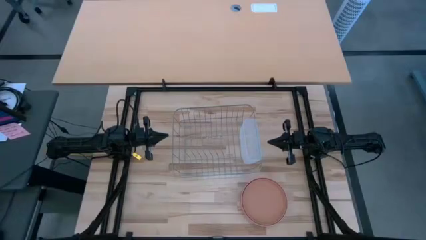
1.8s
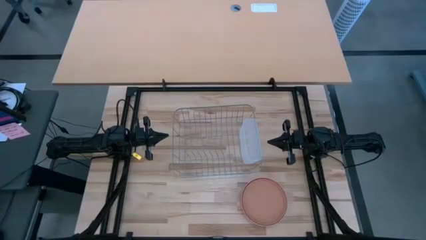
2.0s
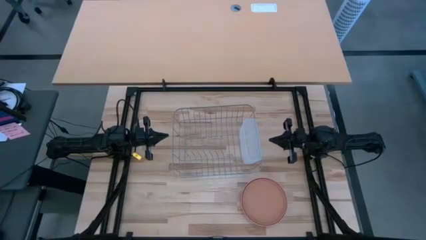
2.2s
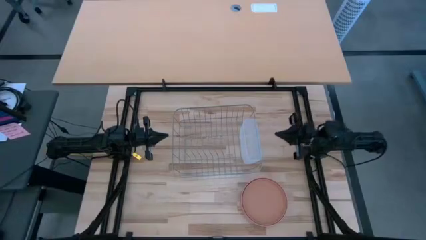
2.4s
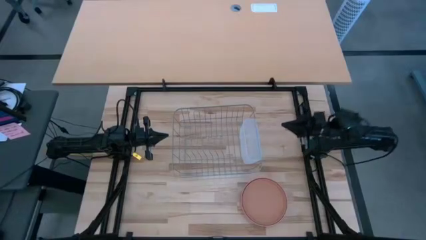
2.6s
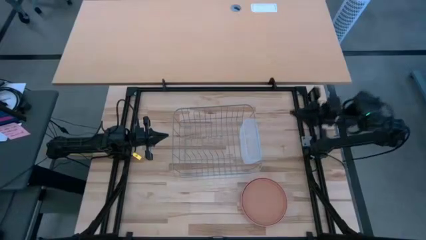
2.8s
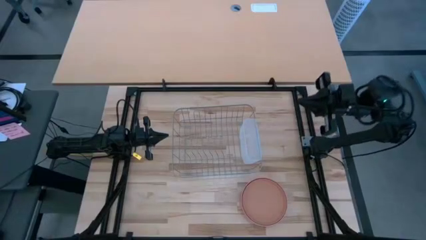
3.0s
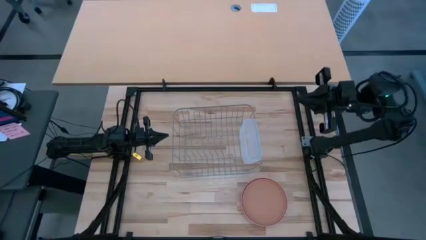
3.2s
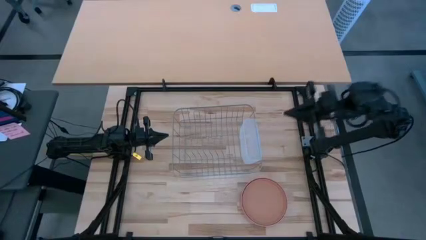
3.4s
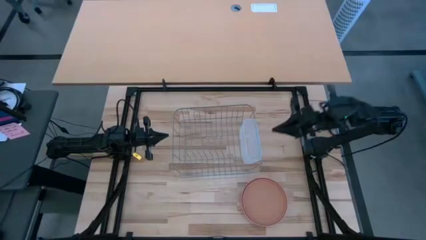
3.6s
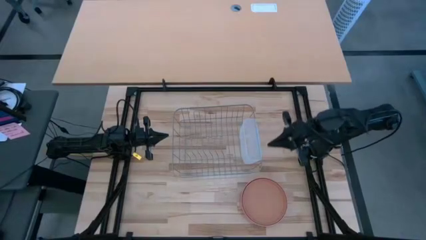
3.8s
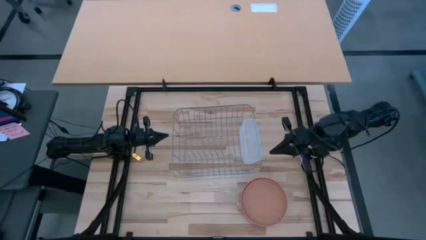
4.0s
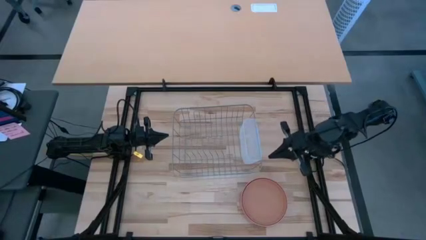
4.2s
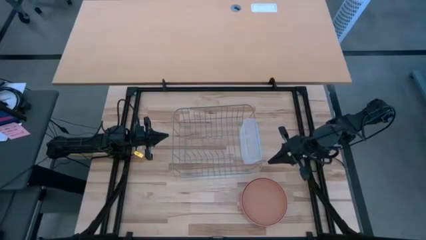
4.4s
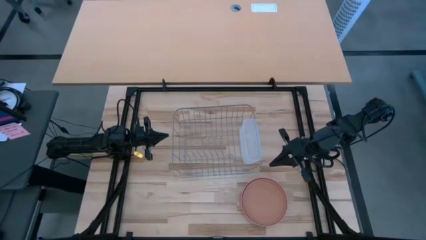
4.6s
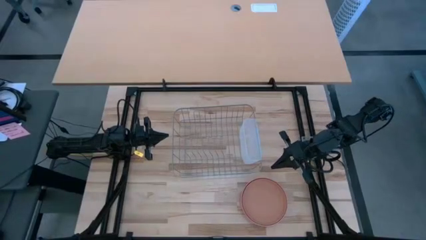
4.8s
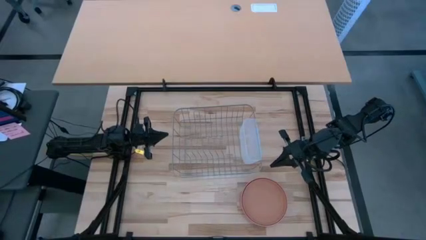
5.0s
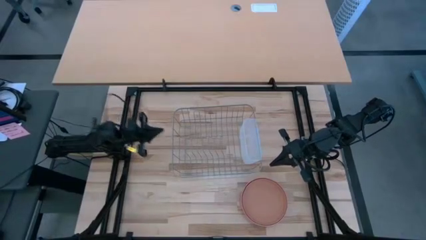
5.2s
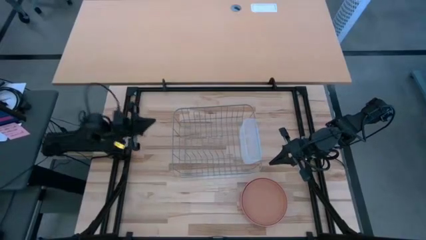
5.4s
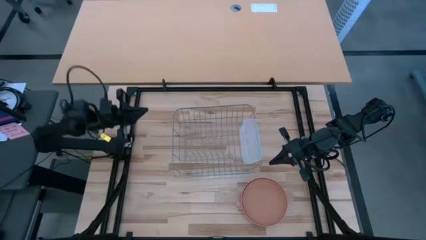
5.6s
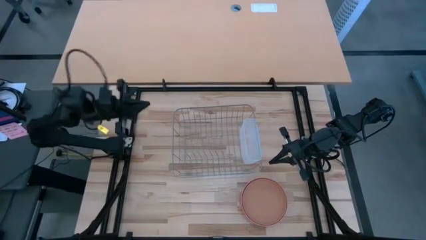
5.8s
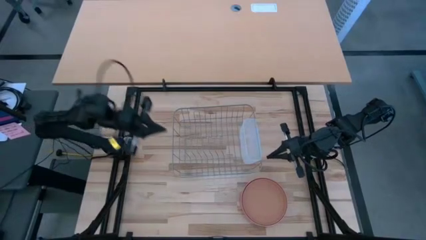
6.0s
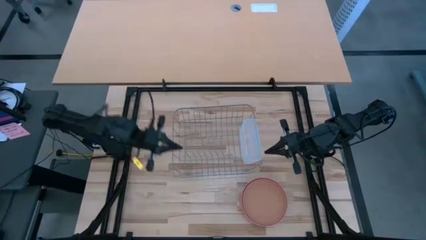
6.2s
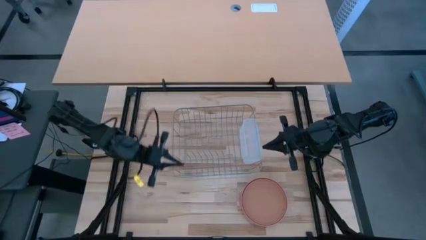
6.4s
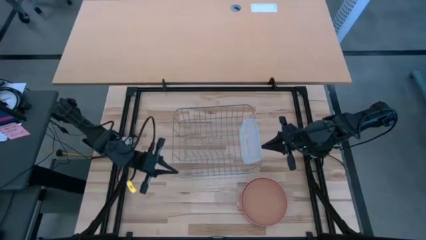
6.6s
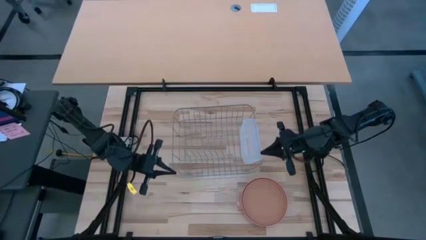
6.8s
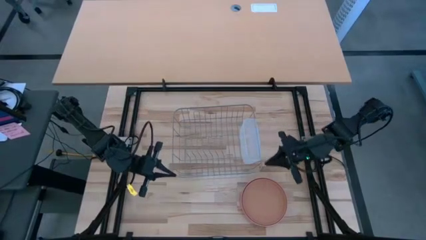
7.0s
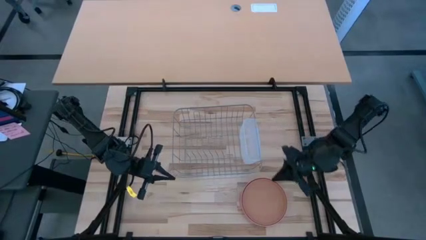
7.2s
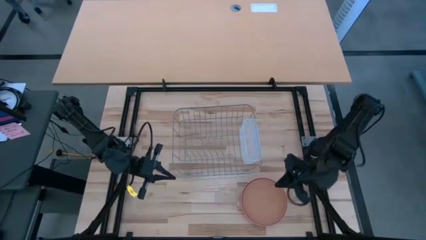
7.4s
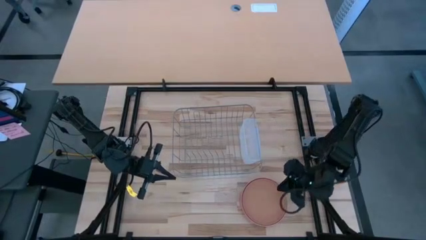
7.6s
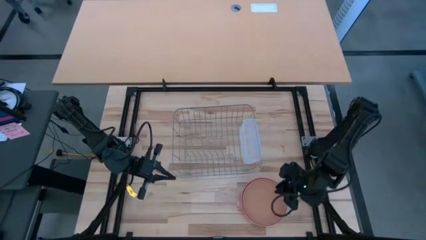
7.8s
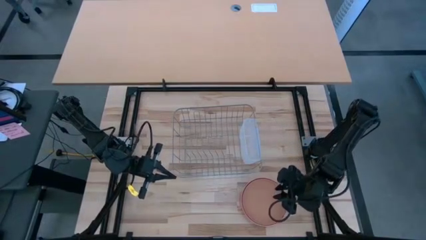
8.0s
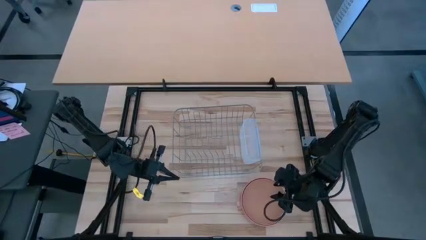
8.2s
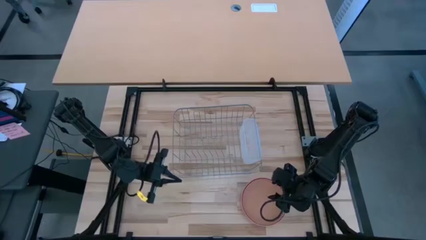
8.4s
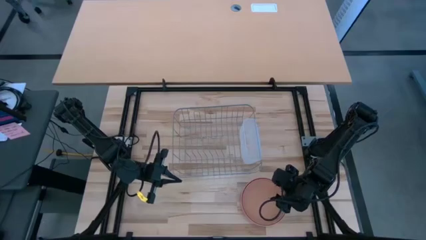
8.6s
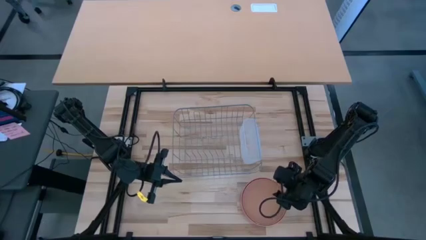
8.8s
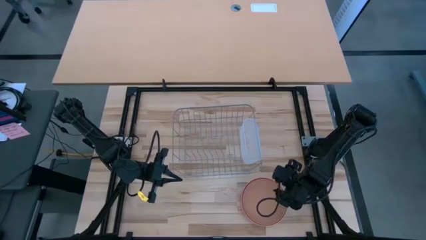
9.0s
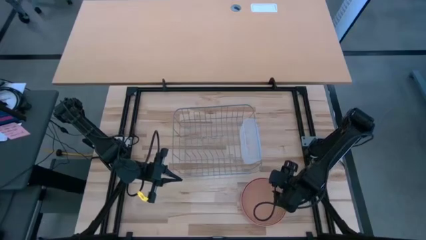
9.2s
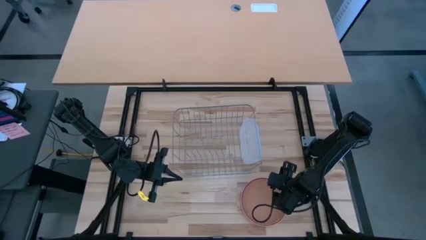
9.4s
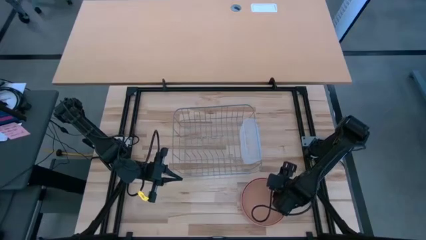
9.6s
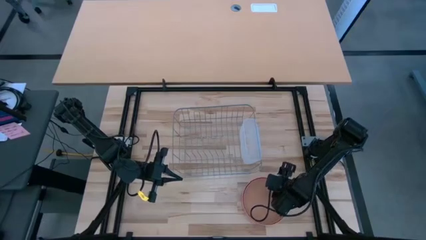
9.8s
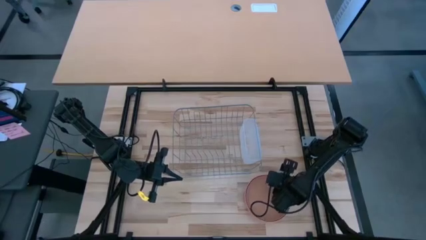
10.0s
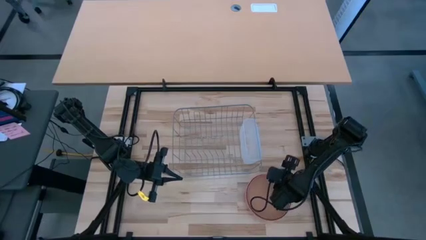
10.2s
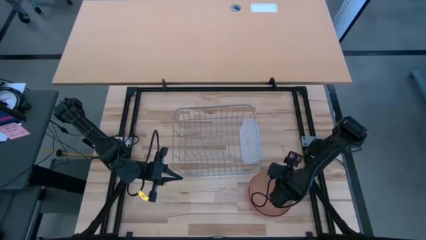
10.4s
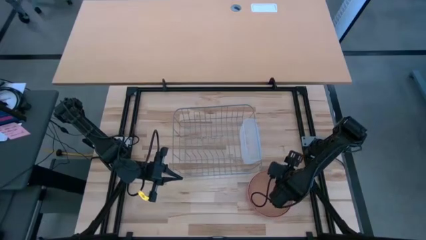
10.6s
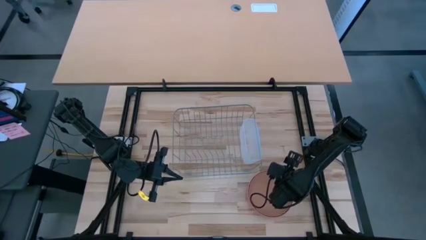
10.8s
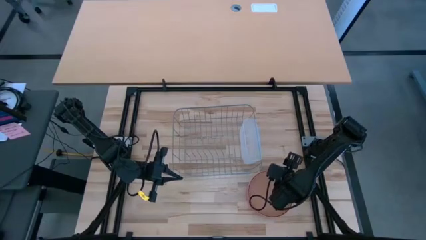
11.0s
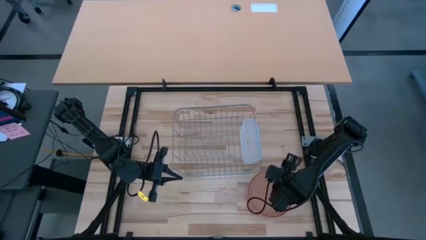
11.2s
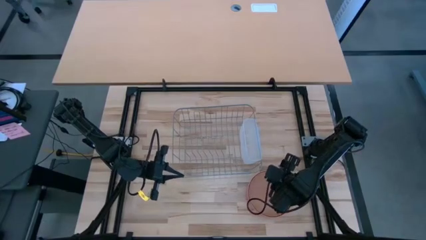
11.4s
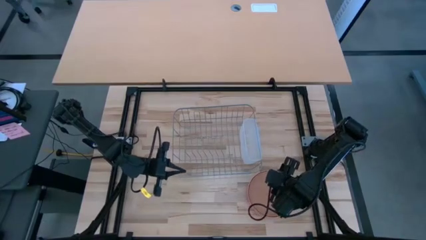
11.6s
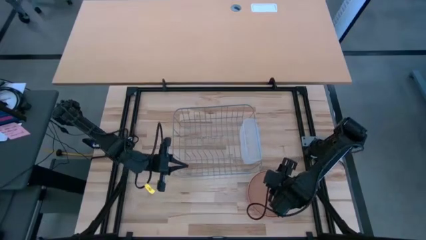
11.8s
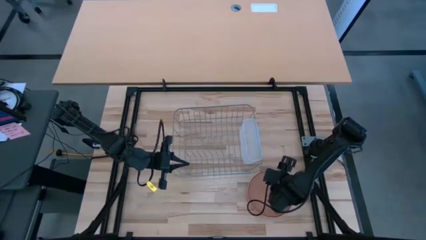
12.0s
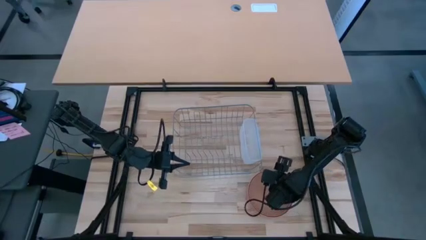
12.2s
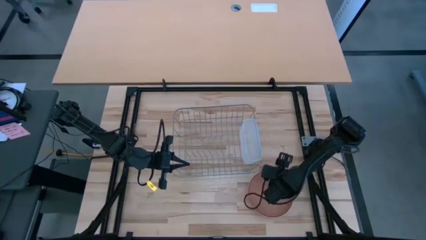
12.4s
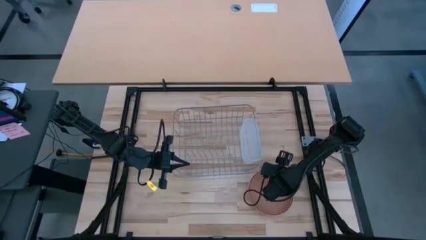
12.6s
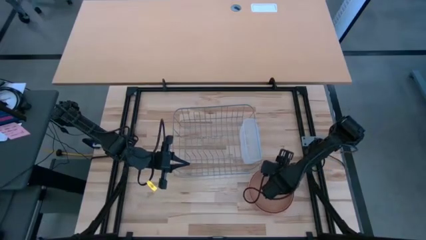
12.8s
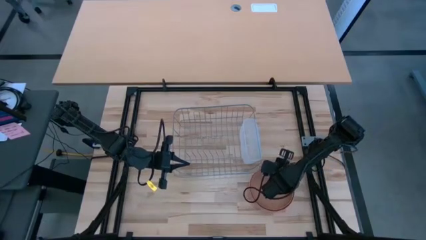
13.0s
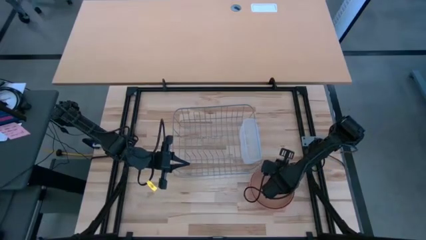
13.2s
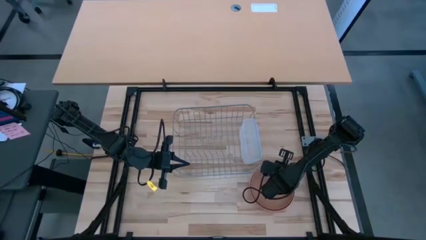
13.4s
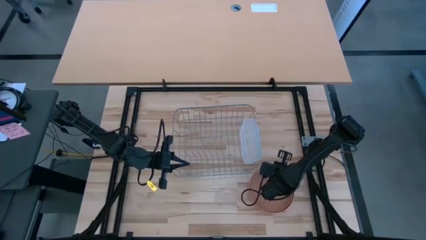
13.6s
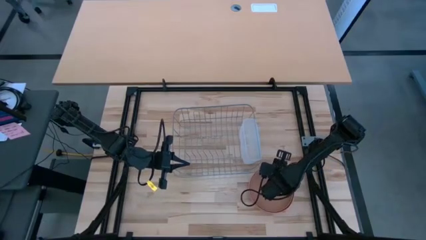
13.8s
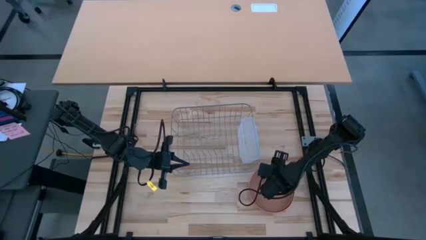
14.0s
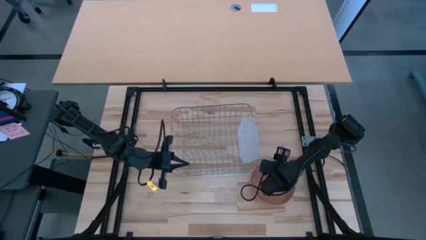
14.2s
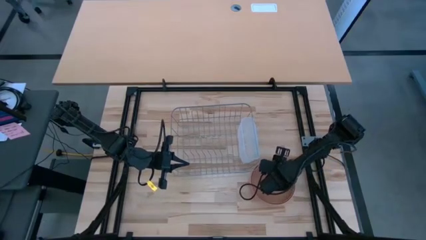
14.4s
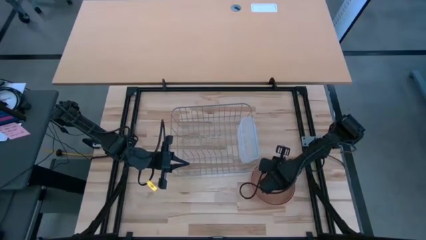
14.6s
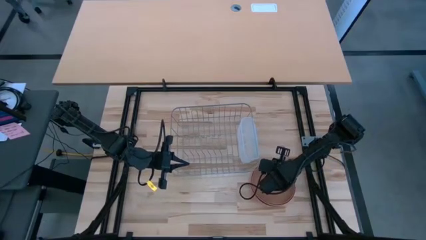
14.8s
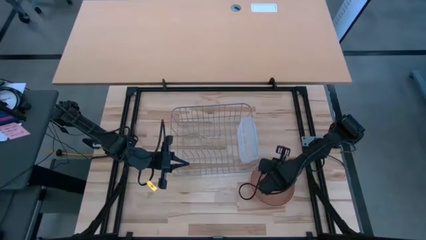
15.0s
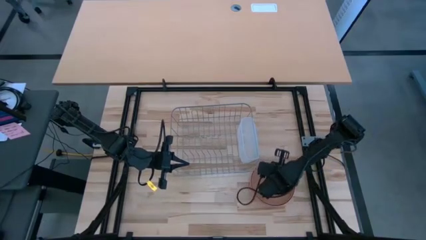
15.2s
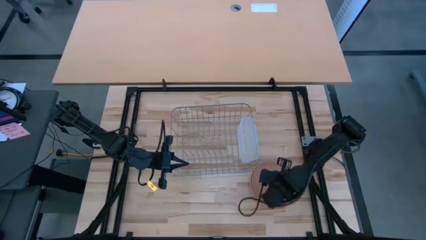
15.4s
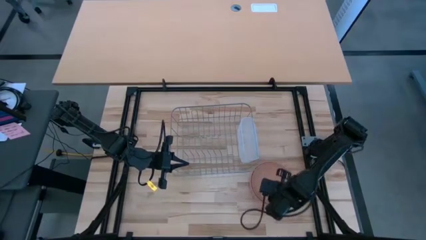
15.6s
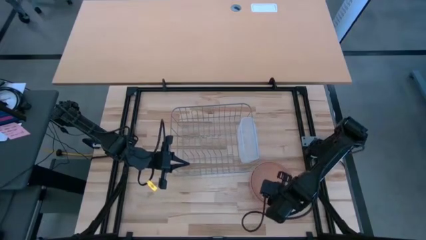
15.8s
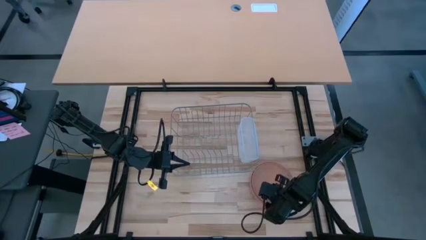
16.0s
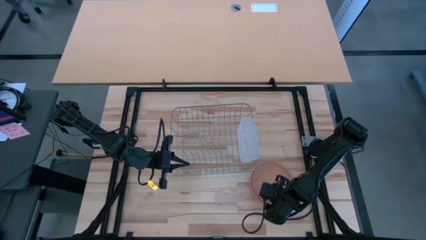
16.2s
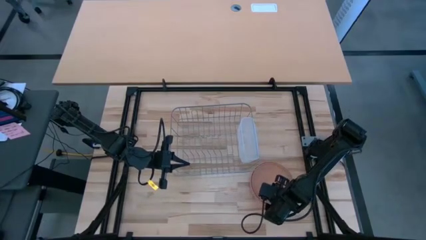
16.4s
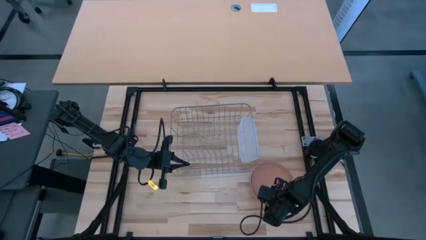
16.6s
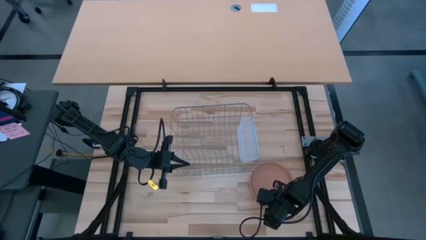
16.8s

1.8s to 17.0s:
Task: Sort dishes
Put the brown plate in the dish rack
